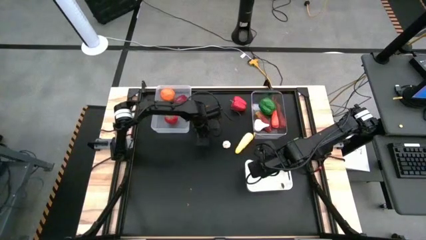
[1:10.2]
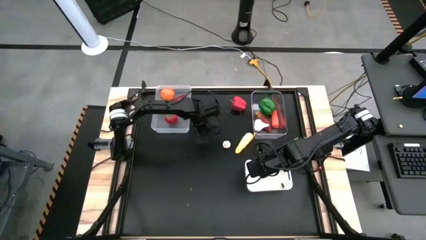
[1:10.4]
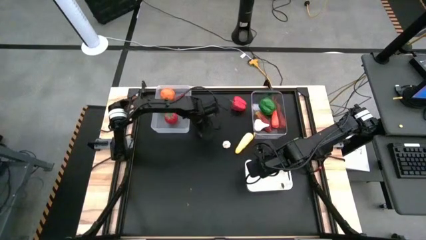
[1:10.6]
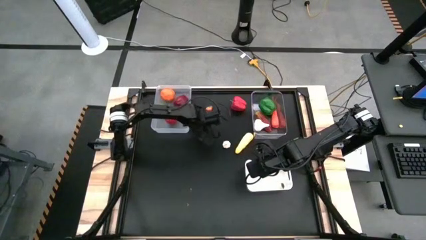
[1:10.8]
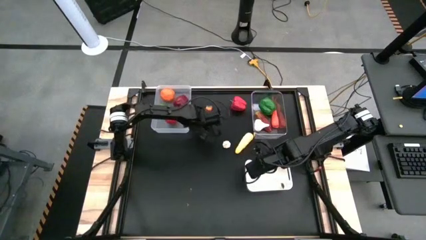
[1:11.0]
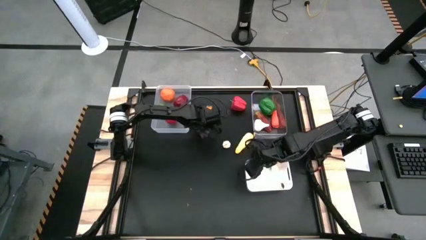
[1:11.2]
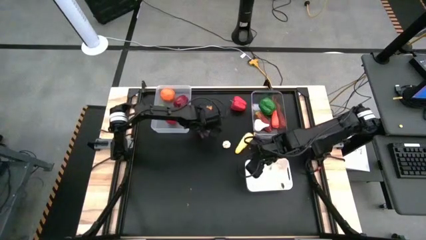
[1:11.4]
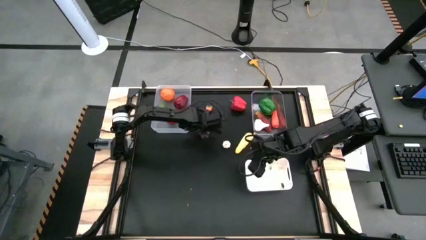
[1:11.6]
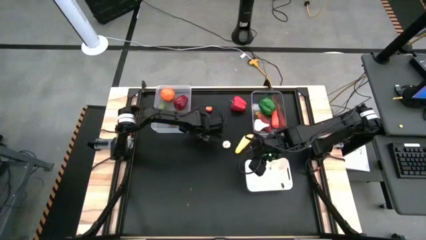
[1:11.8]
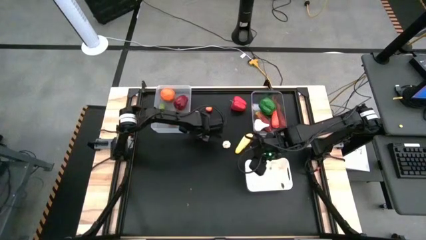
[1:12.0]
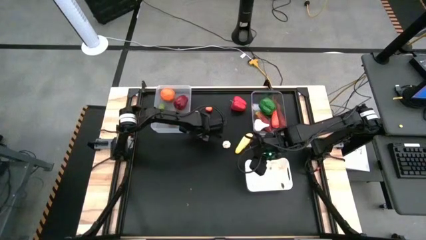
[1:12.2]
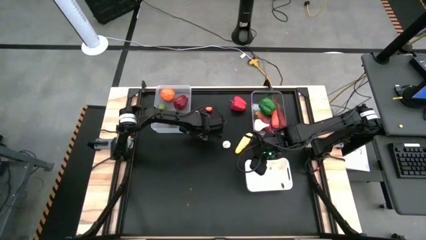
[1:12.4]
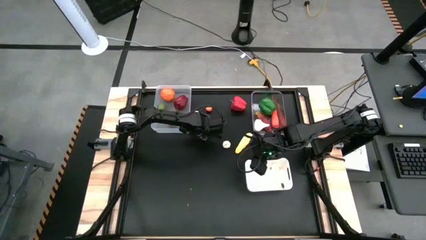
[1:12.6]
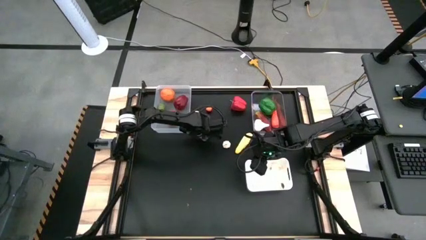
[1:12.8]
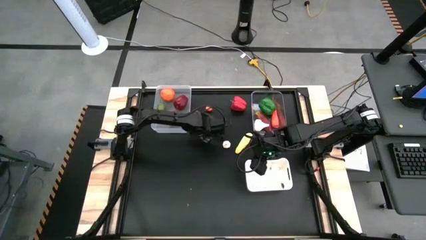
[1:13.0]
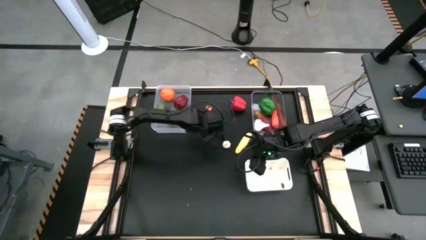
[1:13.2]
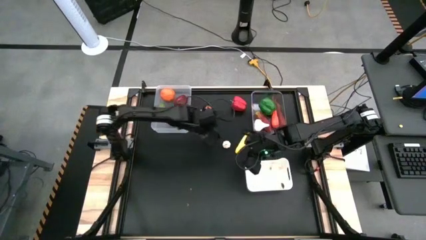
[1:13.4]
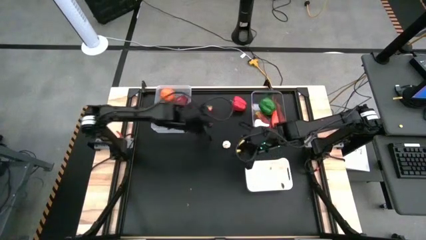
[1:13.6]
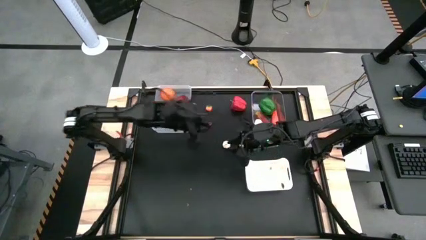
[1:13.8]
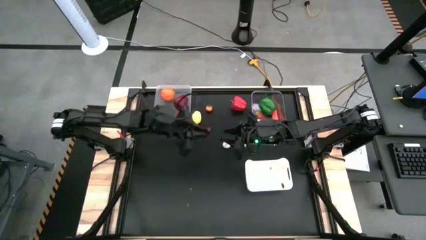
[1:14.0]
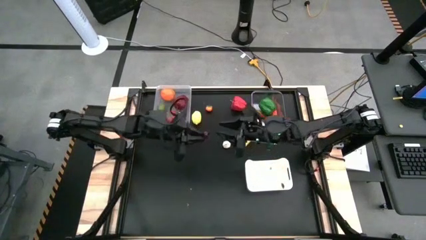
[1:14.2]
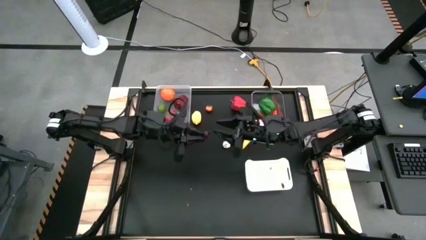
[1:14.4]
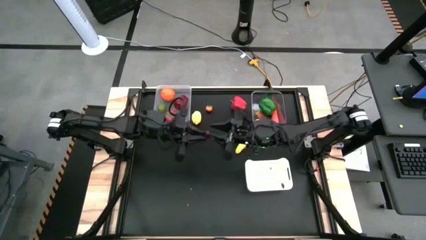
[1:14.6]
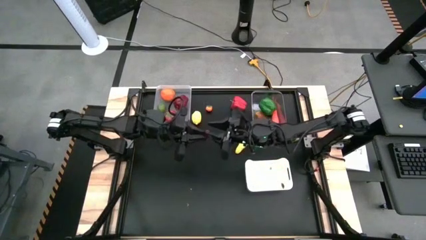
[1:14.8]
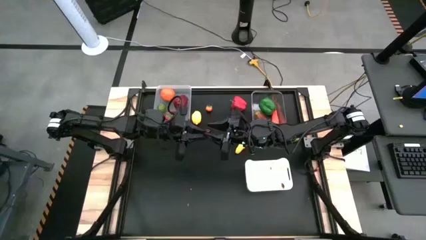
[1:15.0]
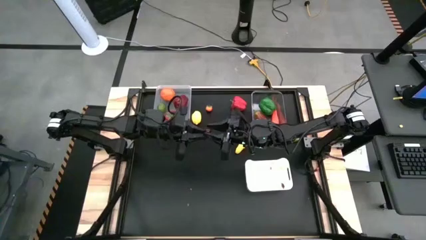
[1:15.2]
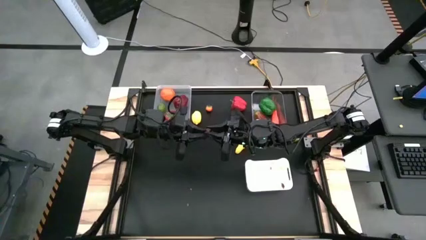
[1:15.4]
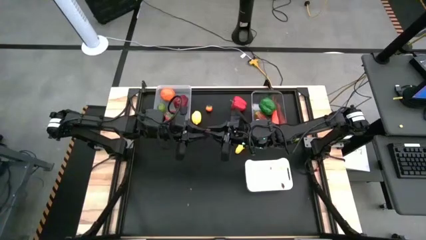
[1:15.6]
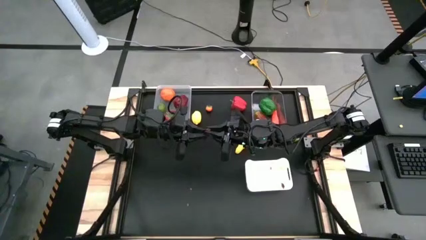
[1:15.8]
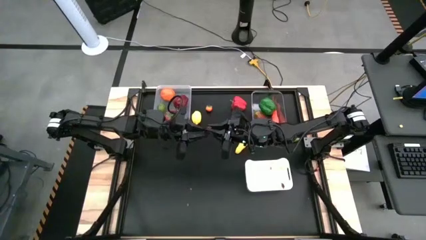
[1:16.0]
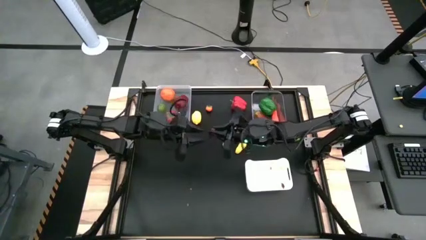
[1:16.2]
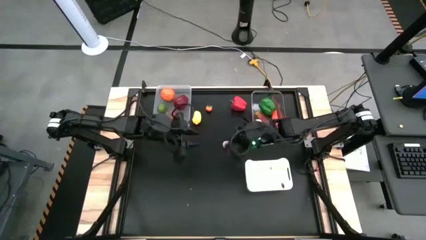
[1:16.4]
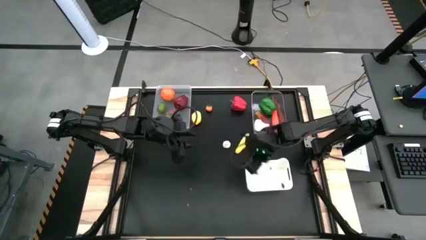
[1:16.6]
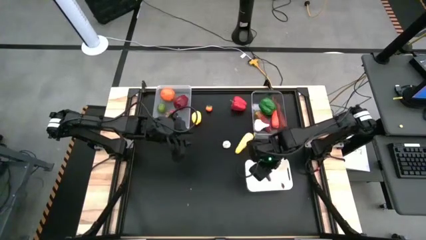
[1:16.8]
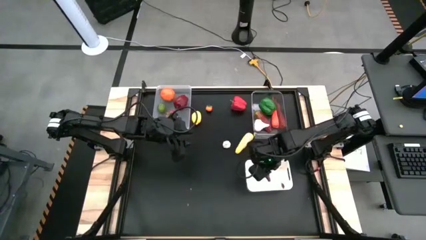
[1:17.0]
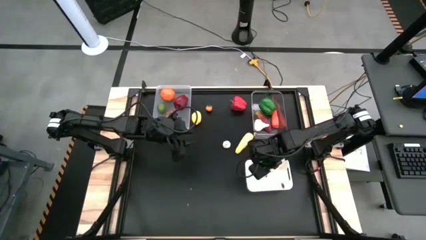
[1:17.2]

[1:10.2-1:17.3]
Task: Sort produce into baskets
Put the purple eggplant into the white bin

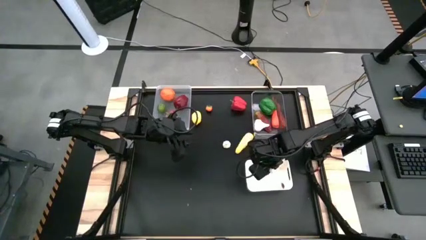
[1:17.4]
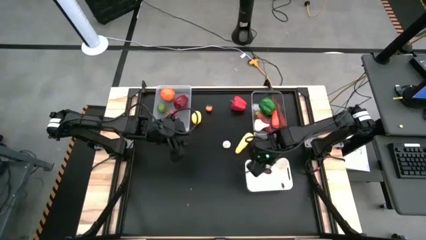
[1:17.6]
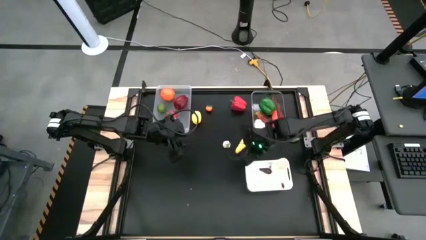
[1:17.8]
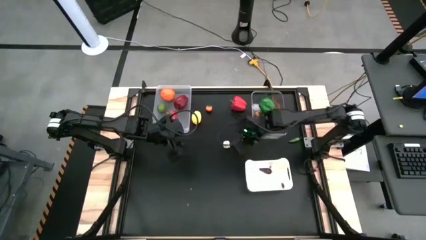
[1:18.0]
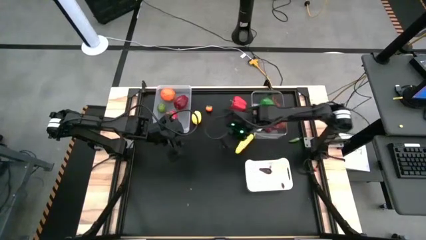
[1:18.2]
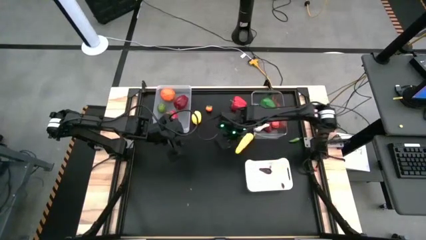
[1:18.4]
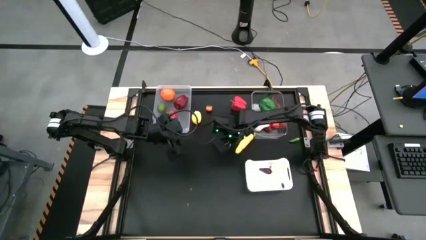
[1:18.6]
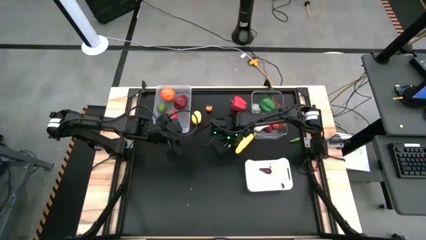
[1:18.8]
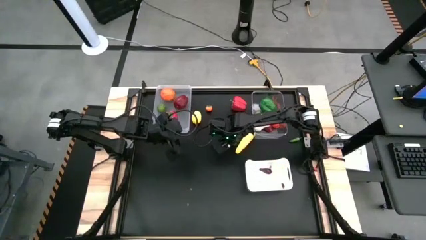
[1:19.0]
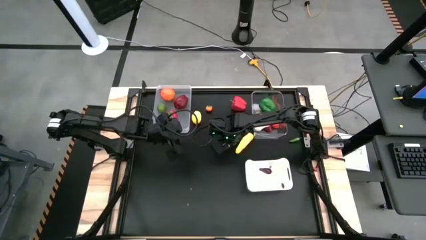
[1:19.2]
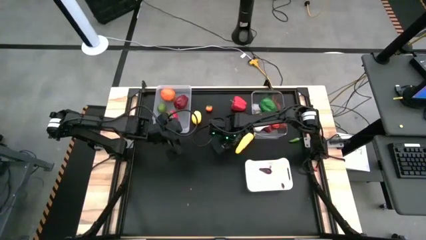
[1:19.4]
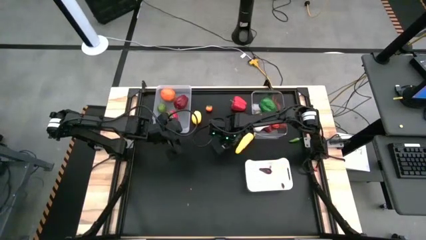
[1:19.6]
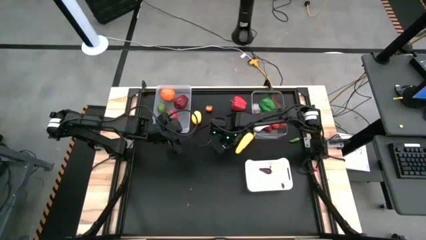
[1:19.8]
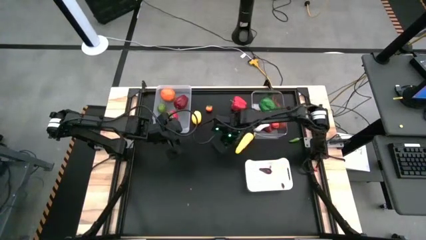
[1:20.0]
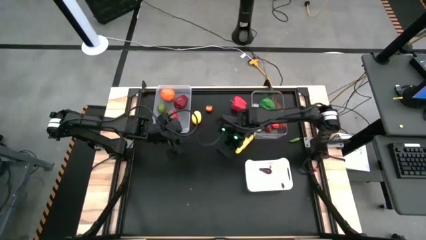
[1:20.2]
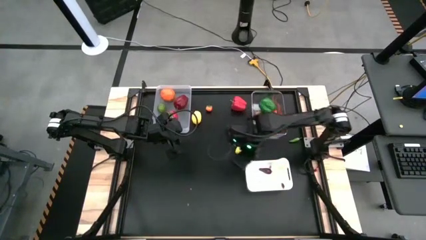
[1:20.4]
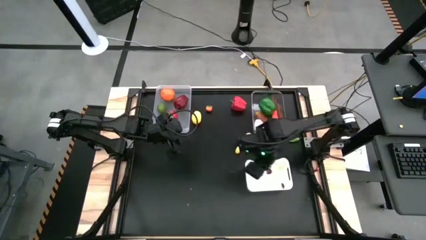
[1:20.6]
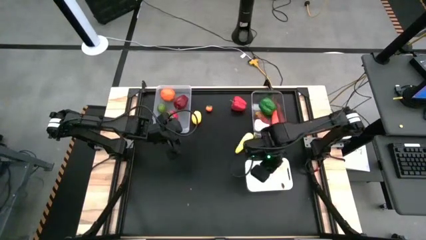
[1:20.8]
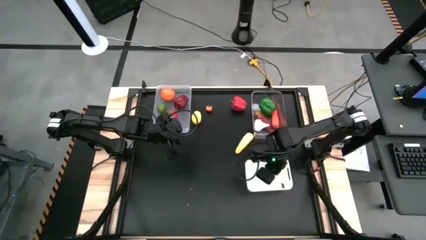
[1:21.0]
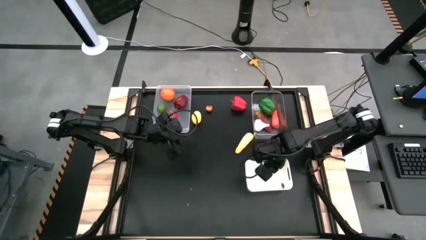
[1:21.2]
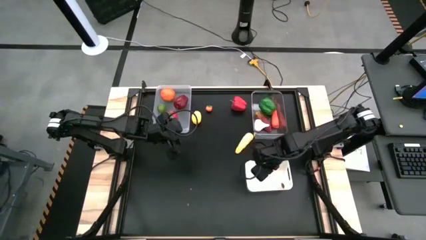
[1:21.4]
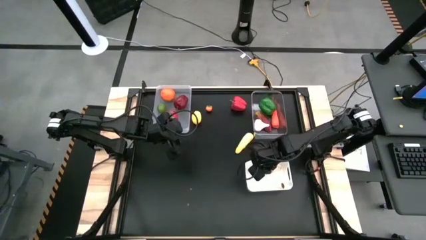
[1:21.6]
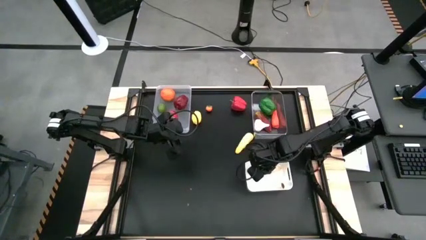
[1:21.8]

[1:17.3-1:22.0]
Put the small white garlic into the white bin

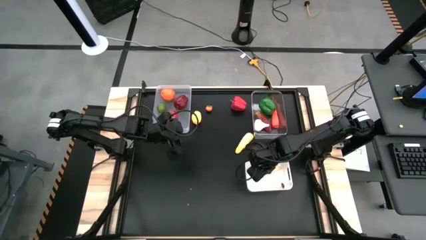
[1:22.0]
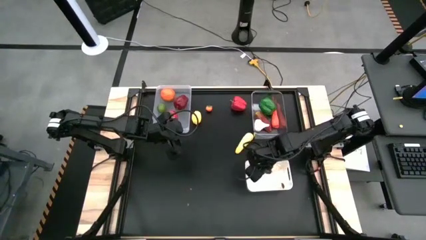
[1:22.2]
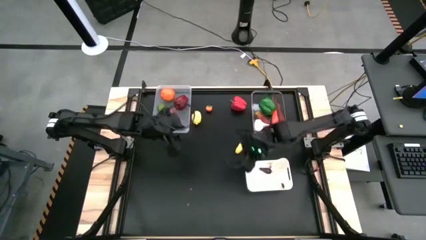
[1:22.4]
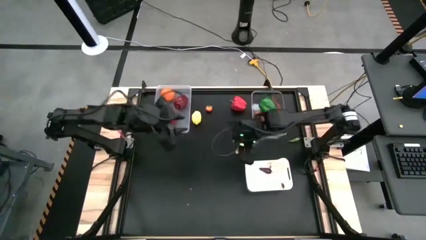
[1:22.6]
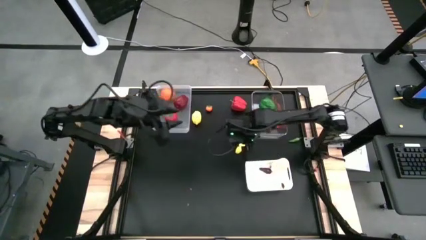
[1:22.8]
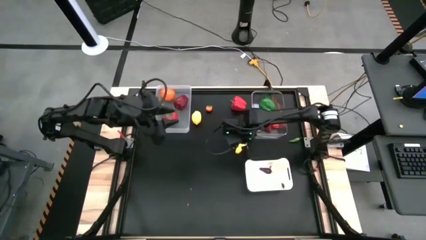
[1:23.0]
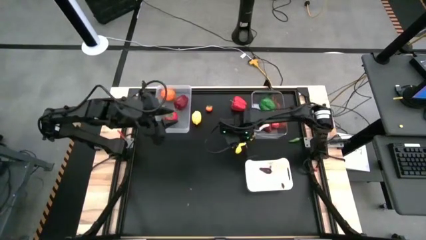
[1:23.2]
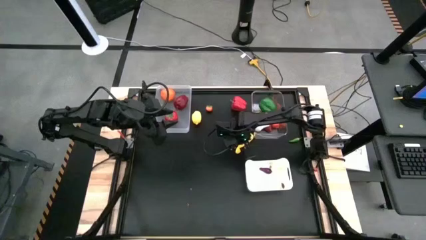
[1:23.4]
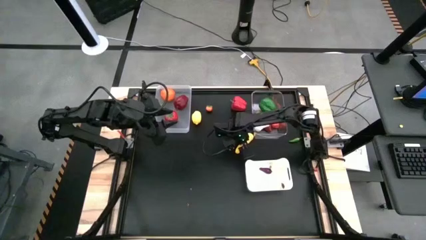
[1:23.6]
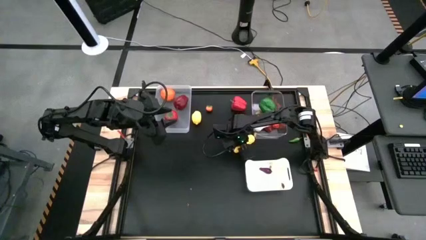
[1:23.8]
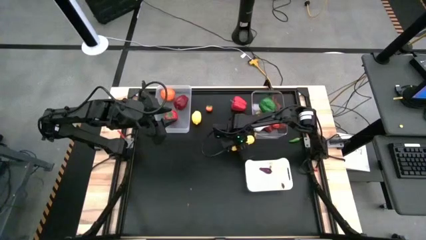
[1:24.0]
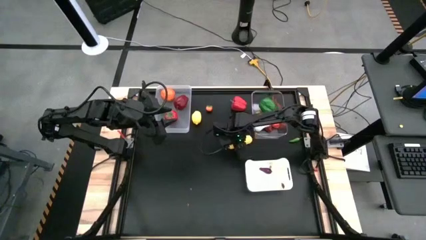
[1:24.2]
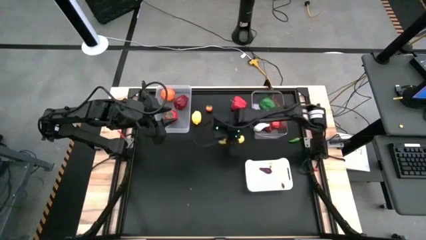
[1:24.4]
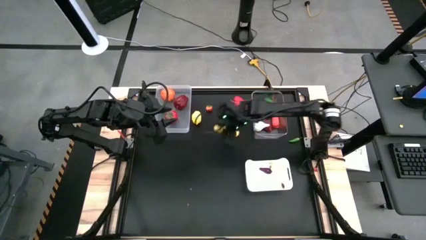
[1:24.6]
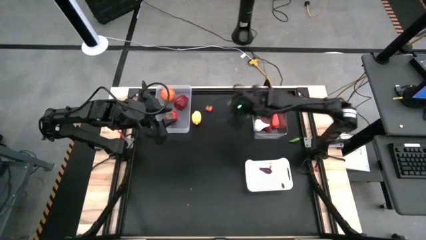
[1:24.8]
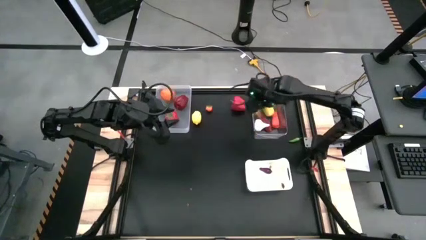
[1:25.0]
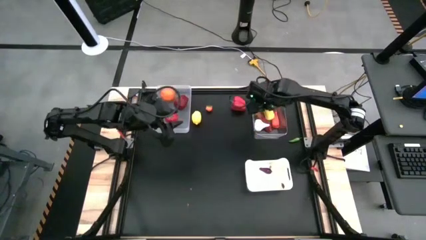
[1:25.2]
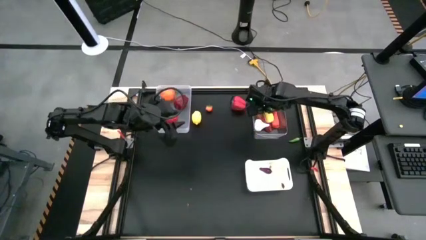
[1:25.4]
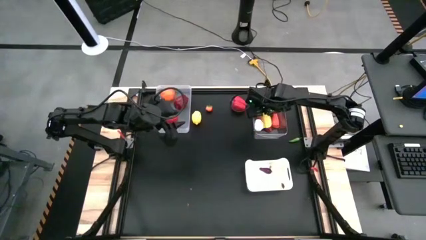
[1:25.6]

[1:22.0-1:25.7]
Put the yellow corn into the transparent bin
